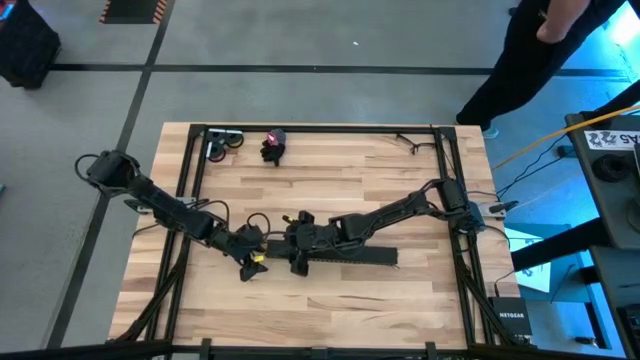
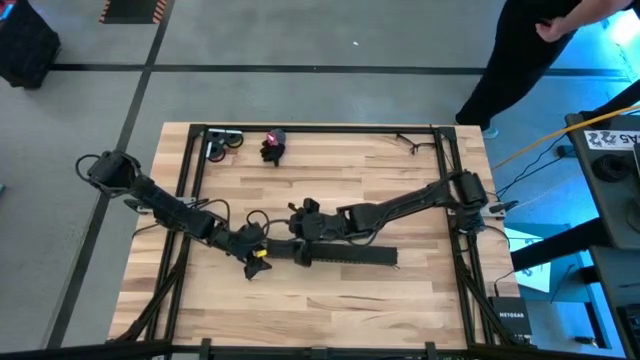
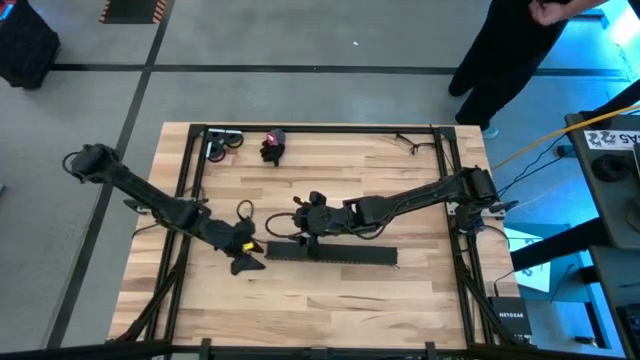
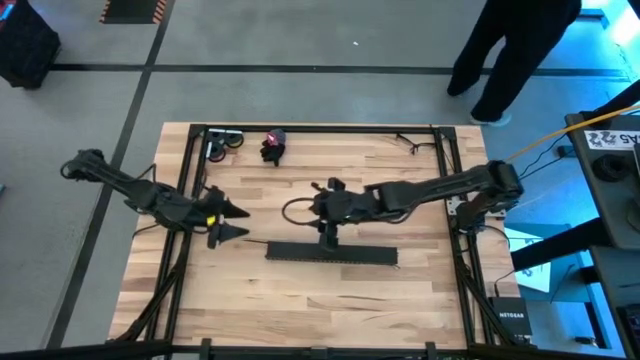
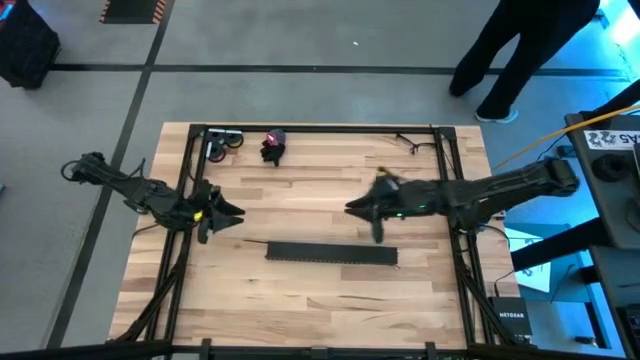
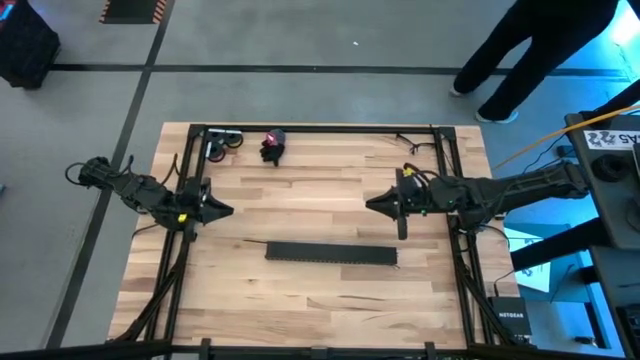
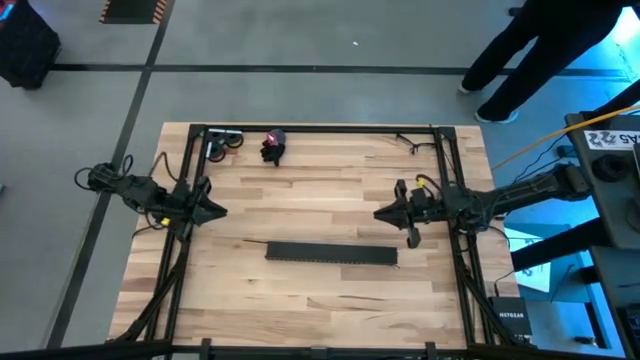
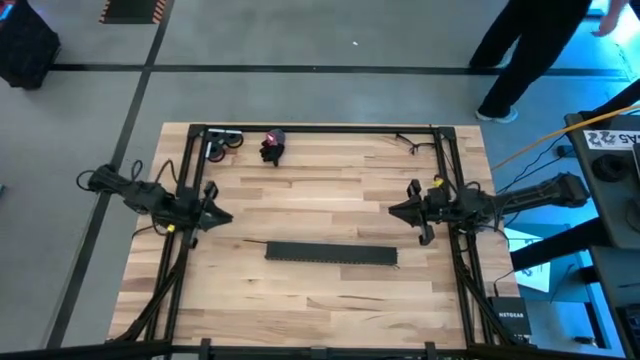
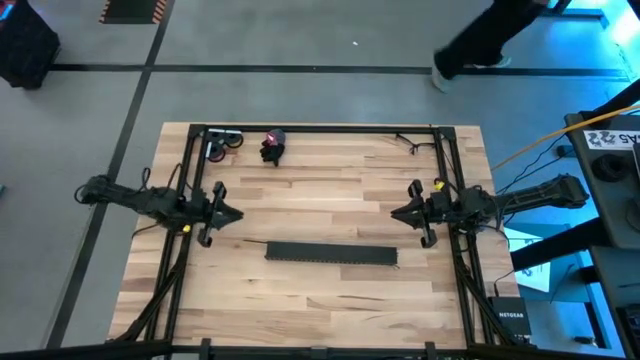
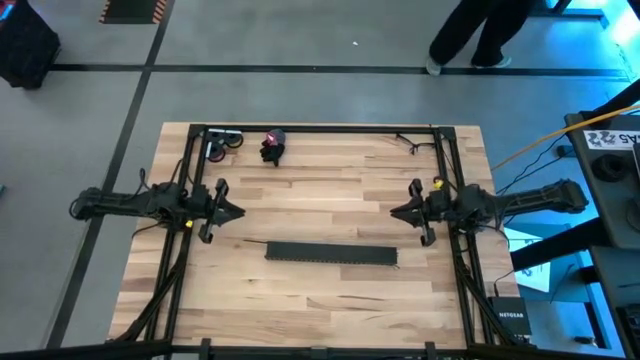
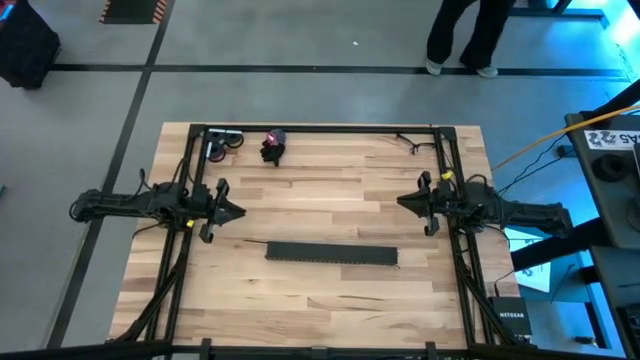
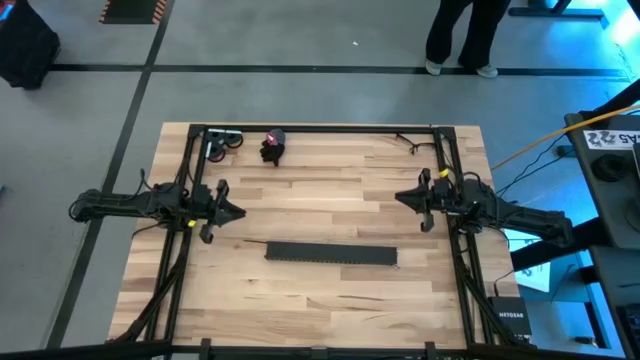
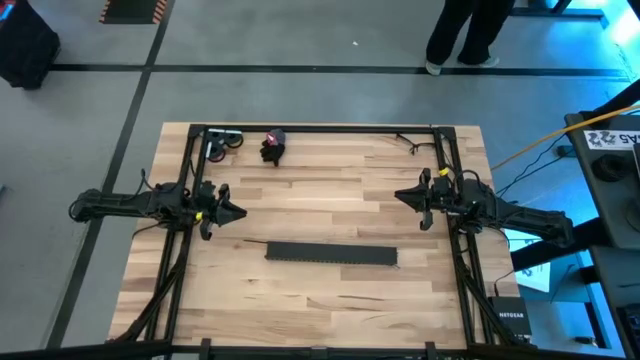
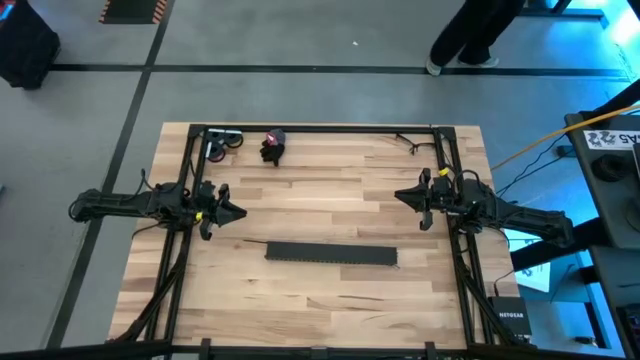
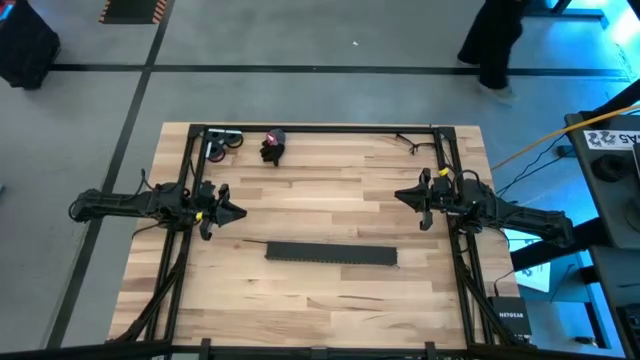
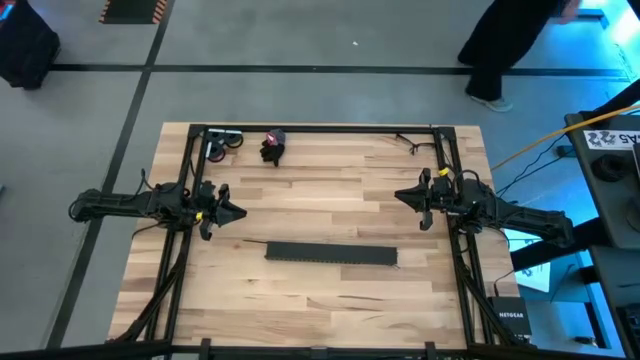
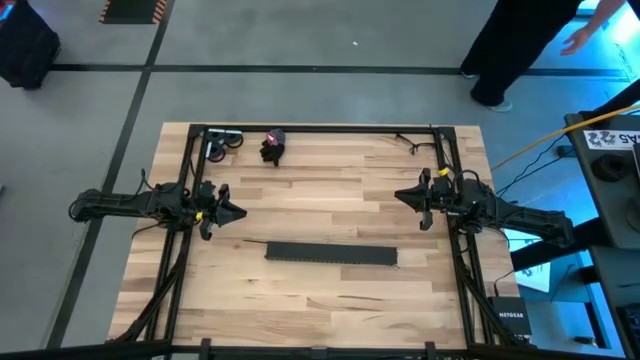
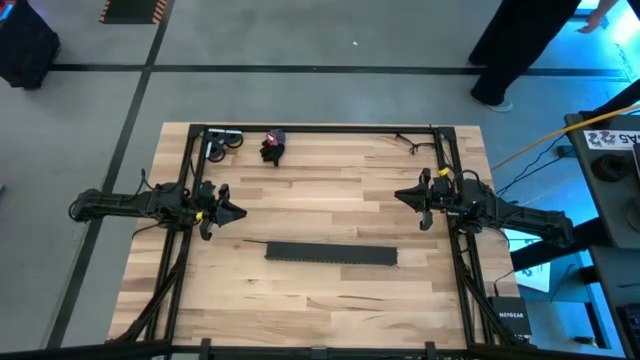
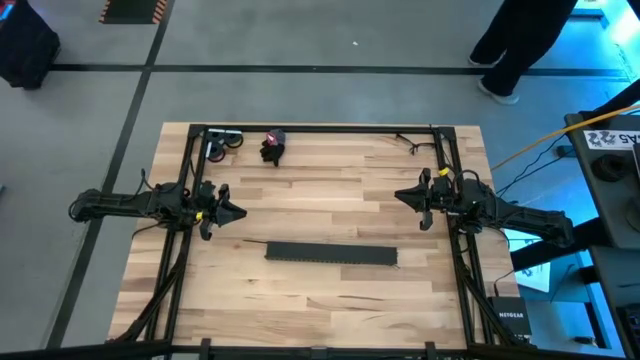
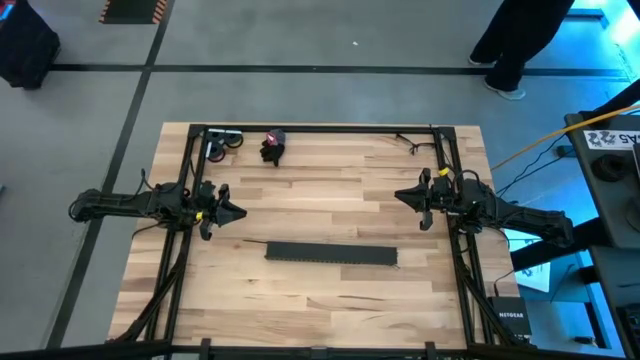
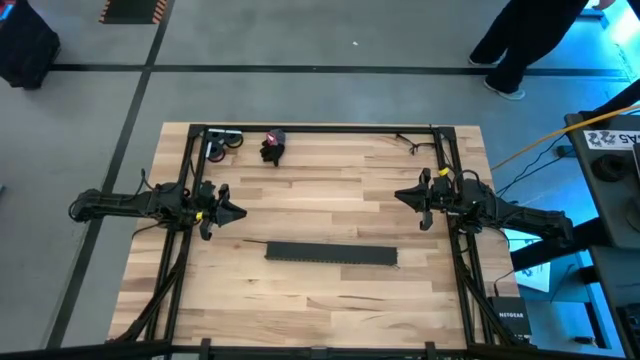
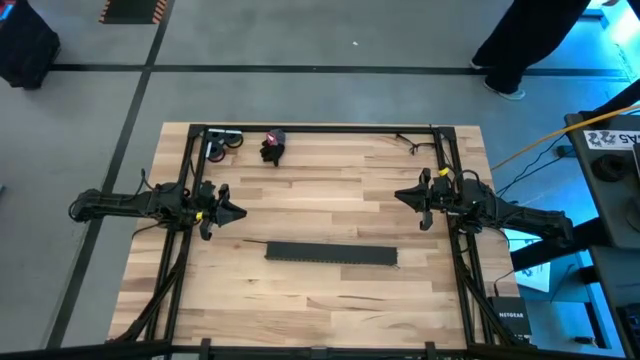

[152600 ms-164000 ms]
Task: Ziptie cables
Return to Home Position

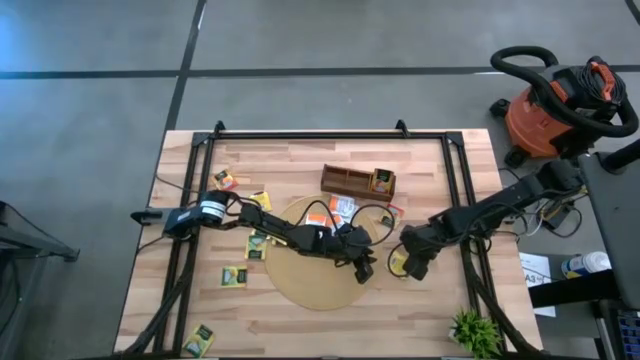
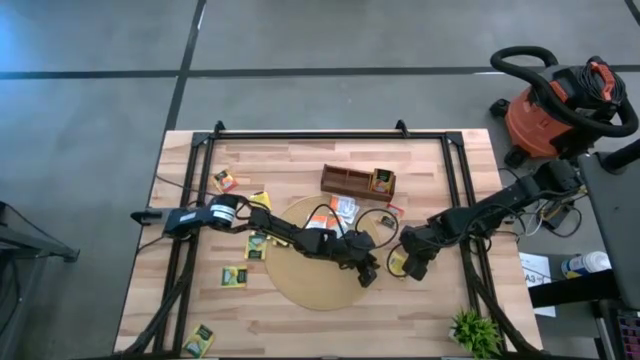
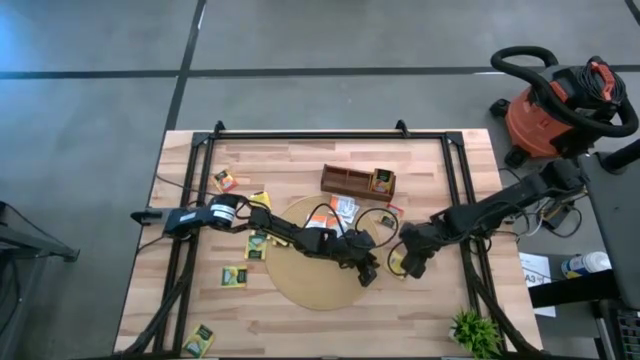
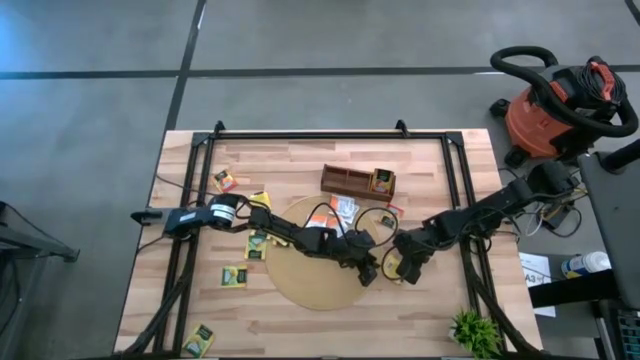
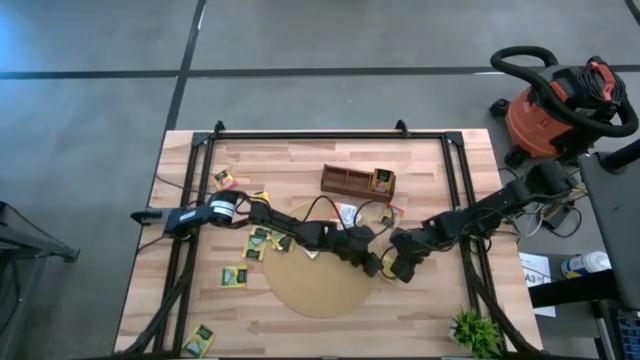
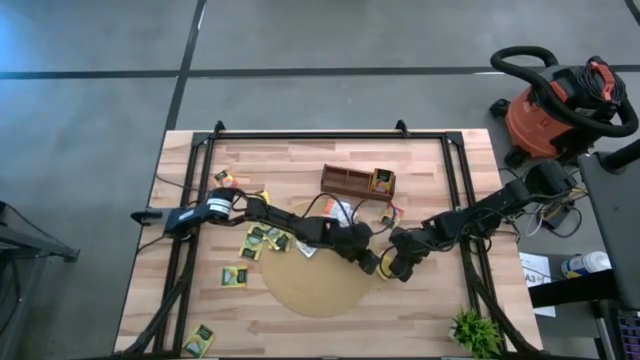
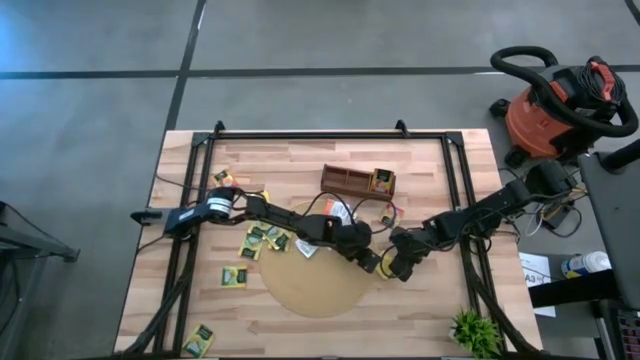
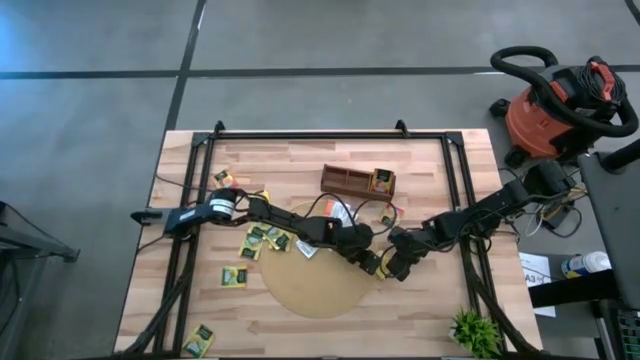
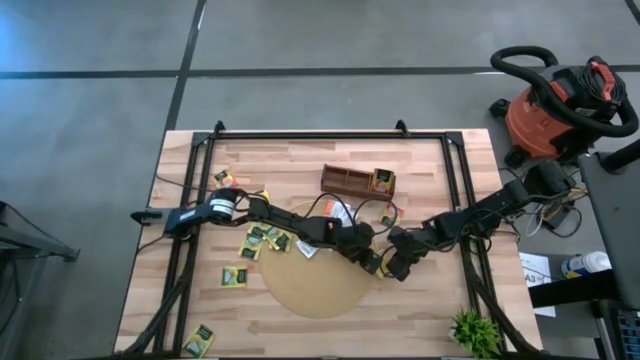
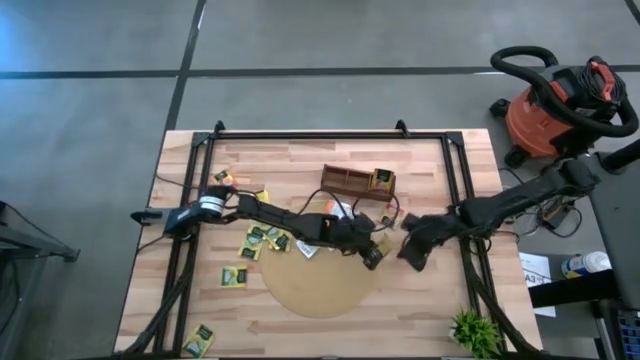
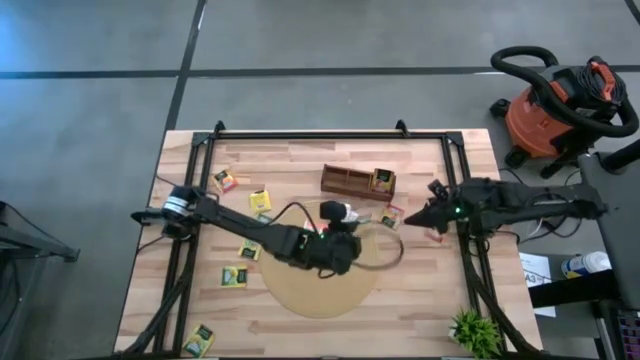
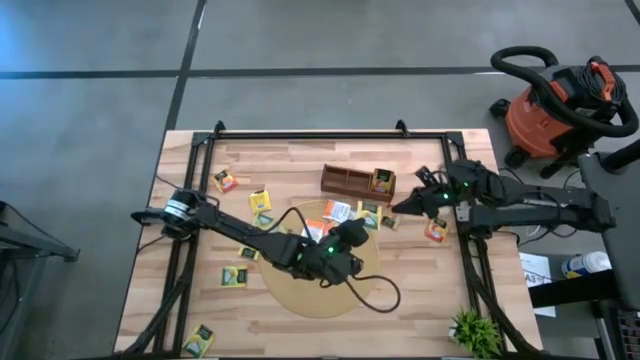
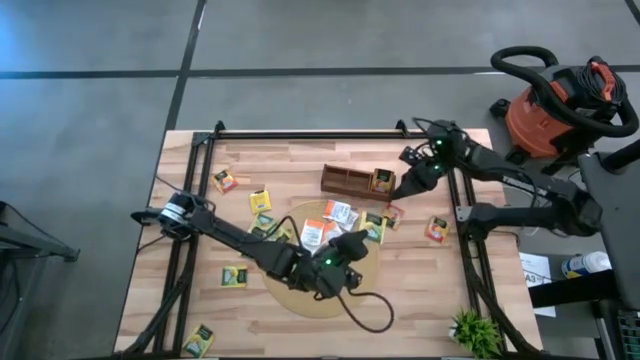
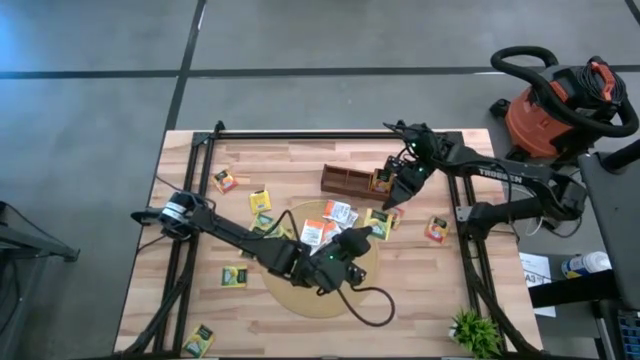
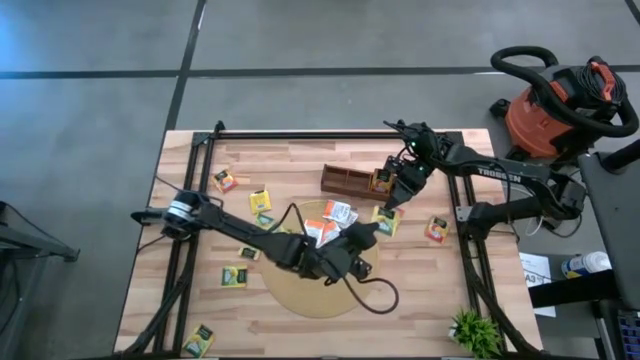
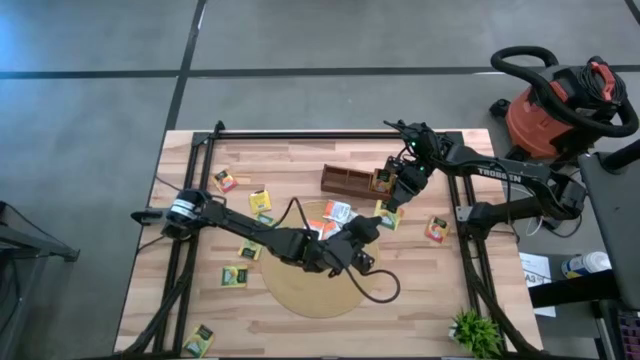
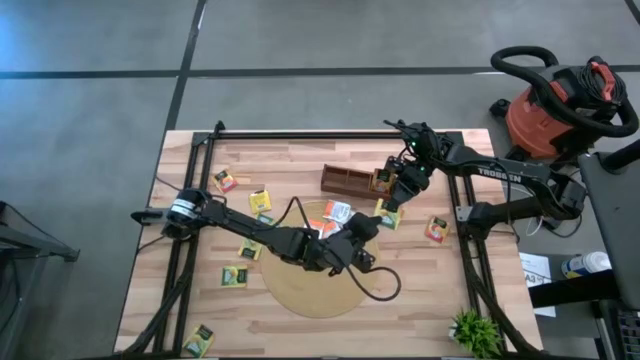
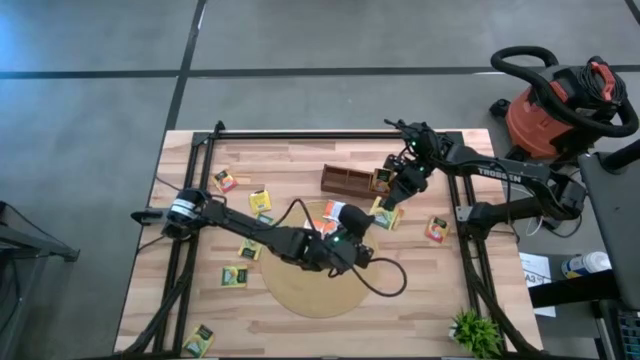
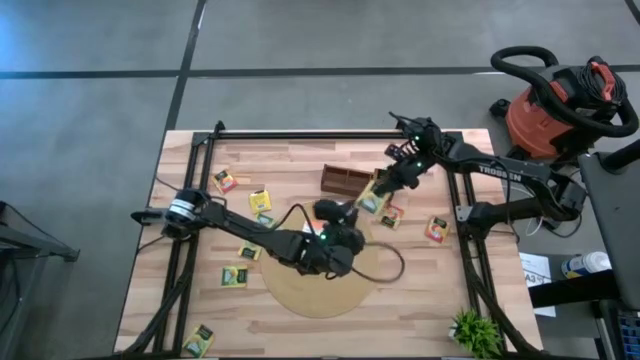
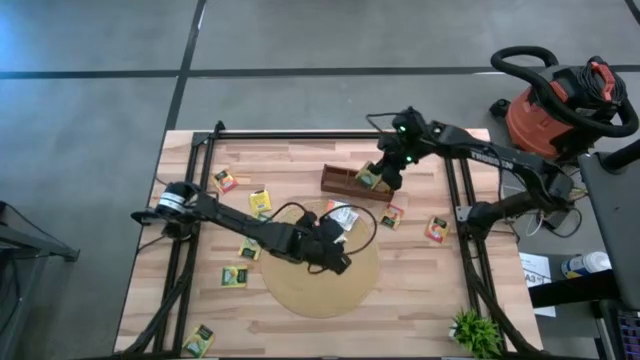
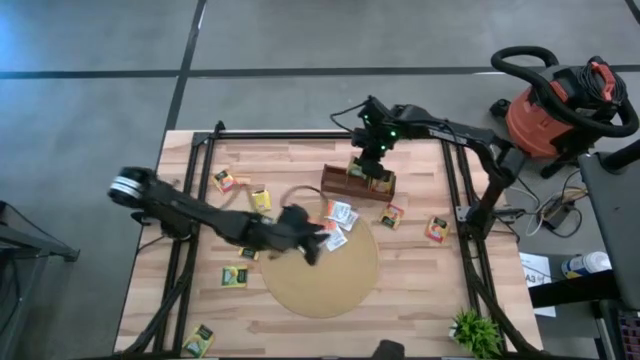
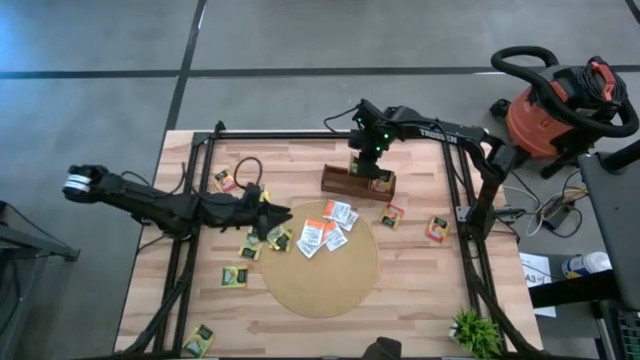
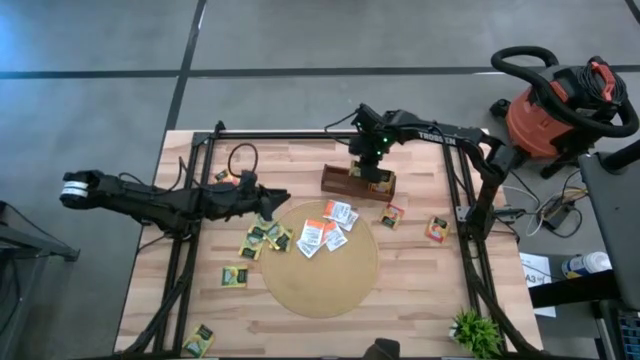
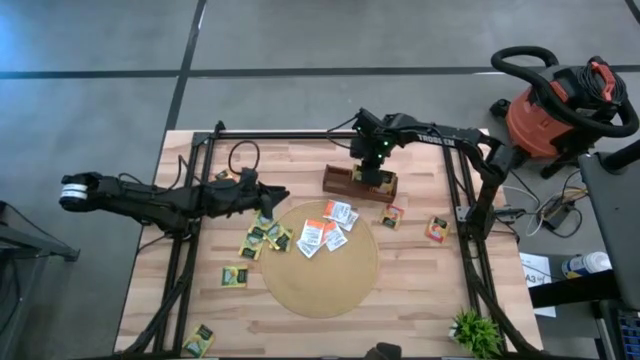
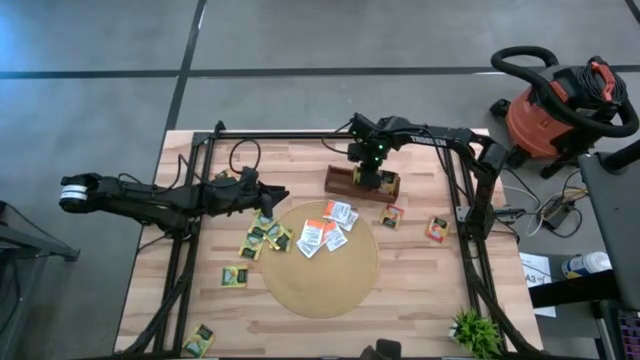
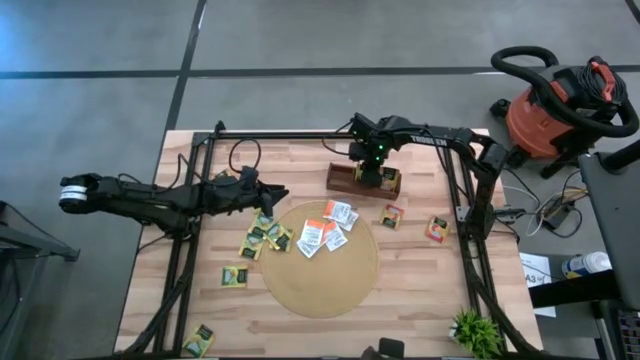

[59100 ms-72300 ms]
Task: Pick & Place Tea
Put the lemon tea bag into the middle section of the wooden organizer
